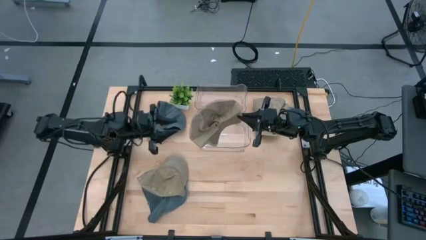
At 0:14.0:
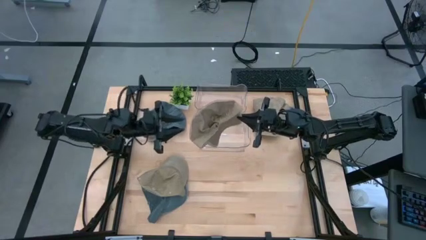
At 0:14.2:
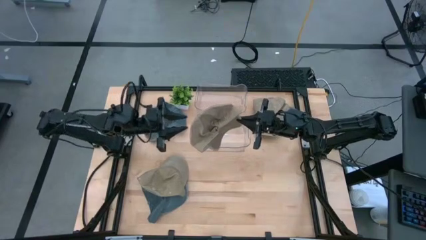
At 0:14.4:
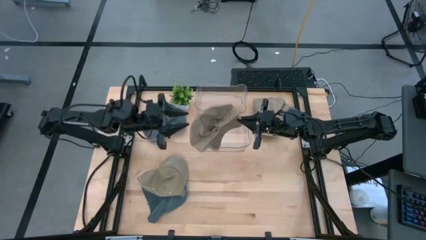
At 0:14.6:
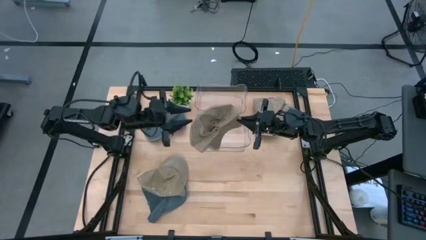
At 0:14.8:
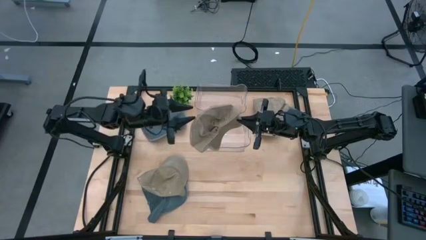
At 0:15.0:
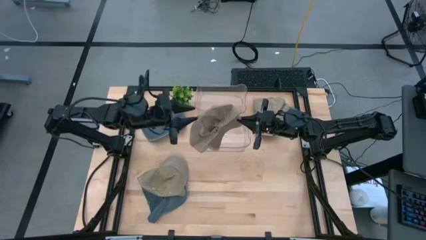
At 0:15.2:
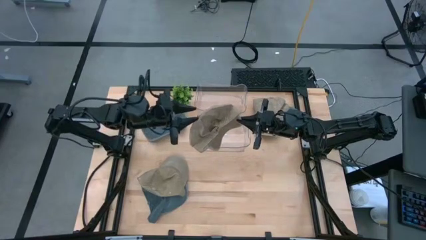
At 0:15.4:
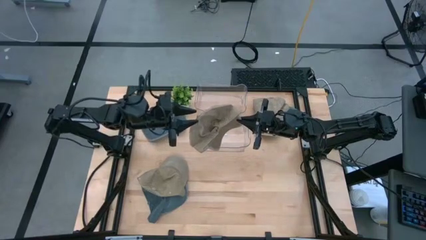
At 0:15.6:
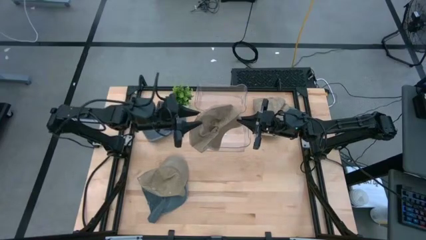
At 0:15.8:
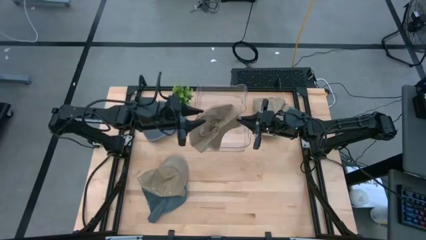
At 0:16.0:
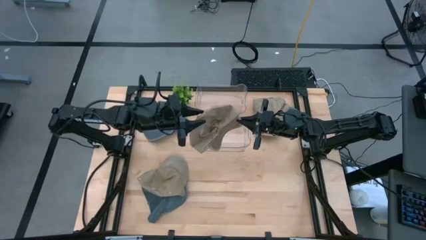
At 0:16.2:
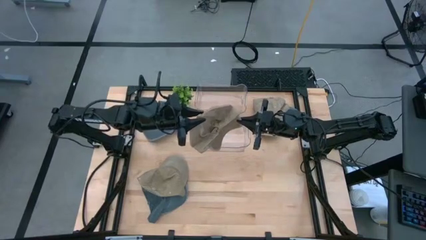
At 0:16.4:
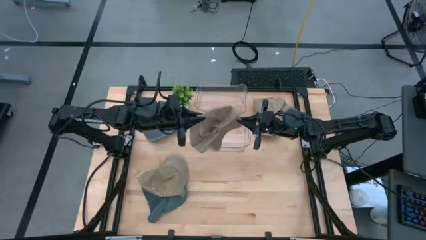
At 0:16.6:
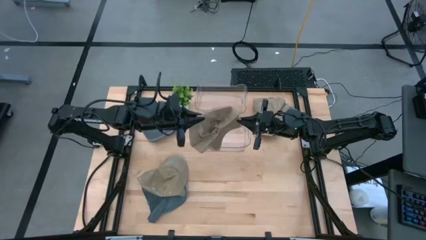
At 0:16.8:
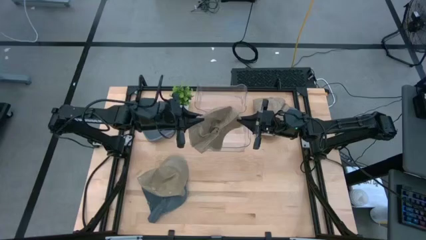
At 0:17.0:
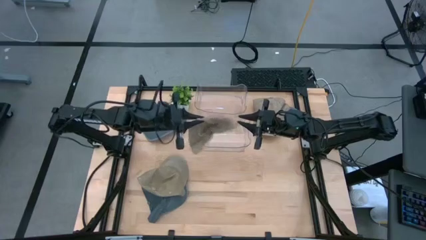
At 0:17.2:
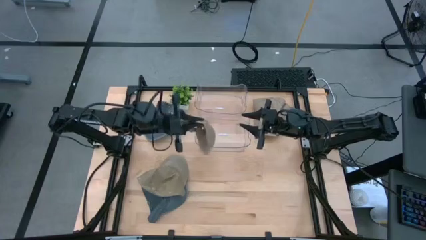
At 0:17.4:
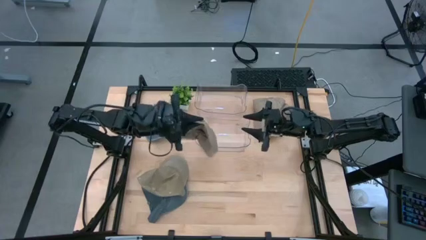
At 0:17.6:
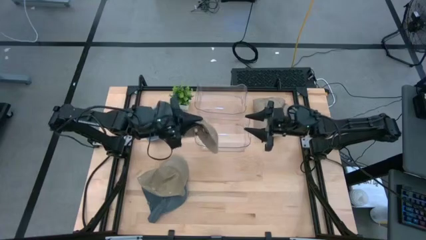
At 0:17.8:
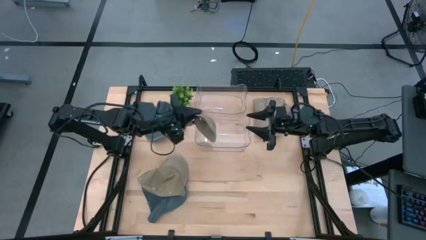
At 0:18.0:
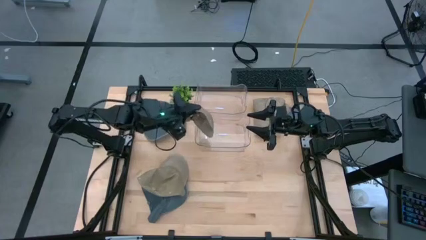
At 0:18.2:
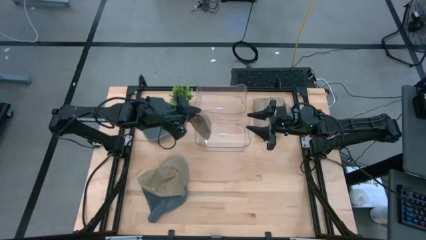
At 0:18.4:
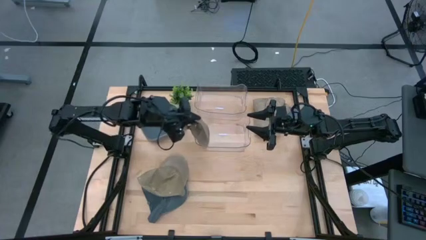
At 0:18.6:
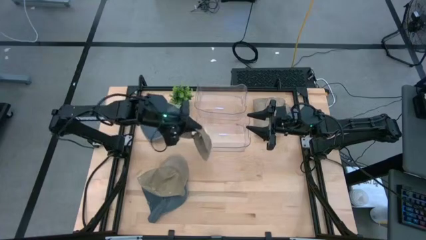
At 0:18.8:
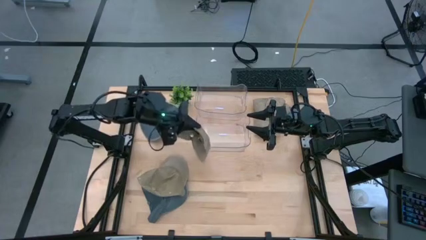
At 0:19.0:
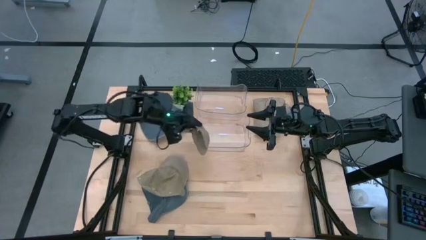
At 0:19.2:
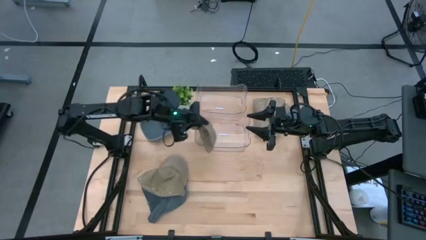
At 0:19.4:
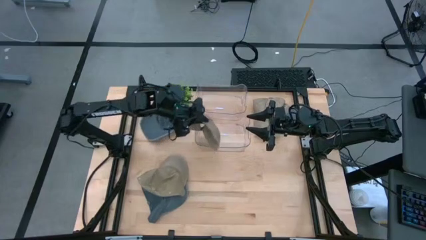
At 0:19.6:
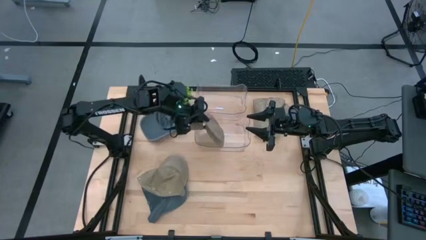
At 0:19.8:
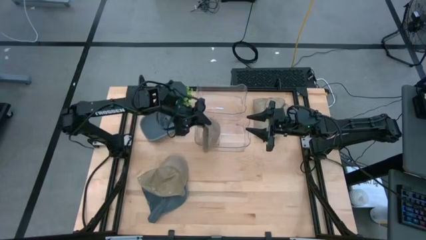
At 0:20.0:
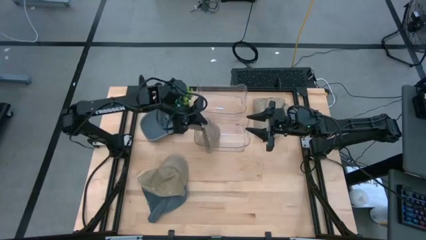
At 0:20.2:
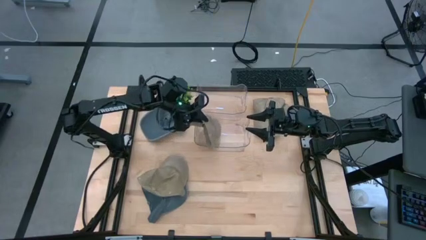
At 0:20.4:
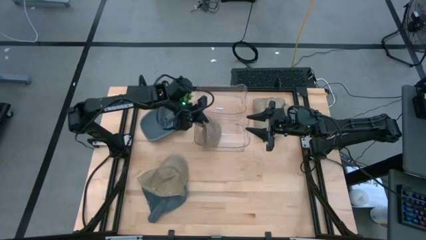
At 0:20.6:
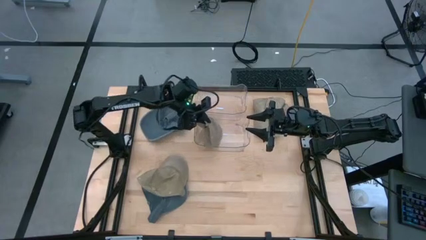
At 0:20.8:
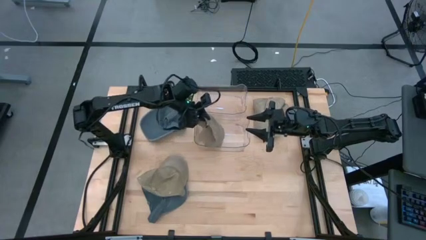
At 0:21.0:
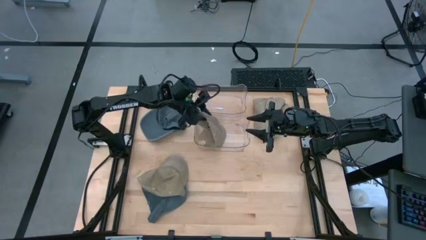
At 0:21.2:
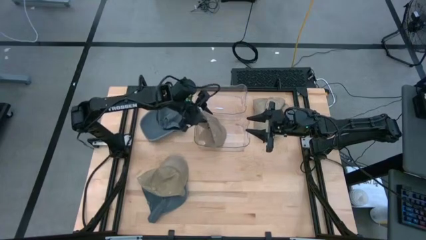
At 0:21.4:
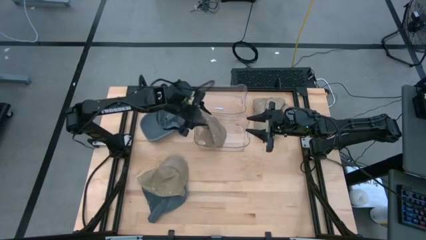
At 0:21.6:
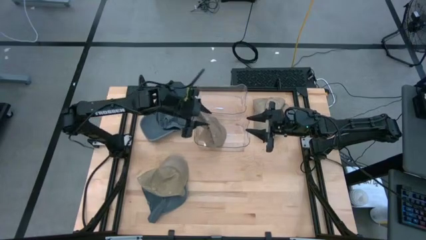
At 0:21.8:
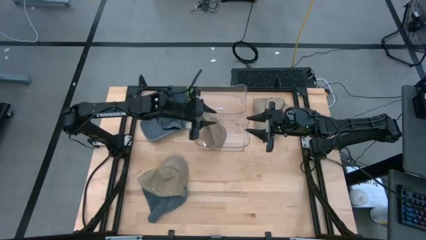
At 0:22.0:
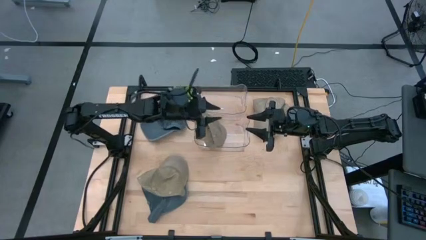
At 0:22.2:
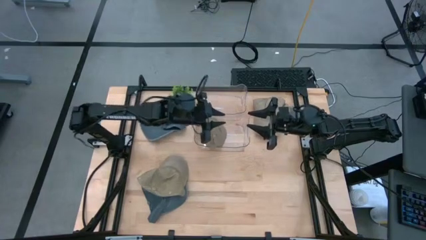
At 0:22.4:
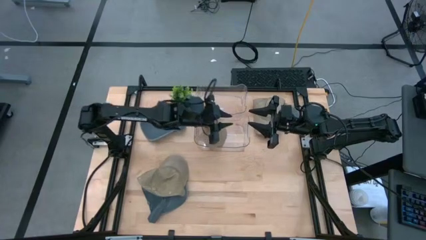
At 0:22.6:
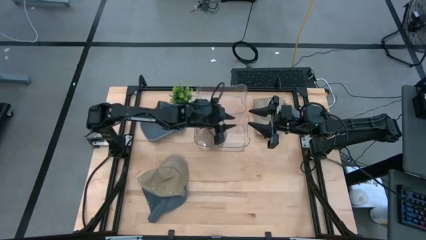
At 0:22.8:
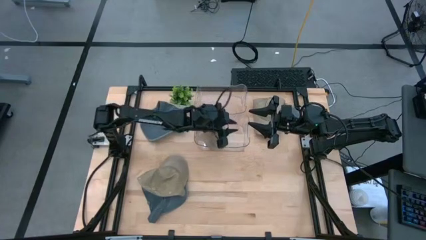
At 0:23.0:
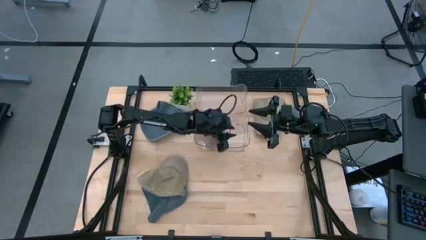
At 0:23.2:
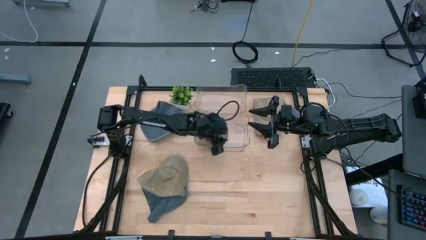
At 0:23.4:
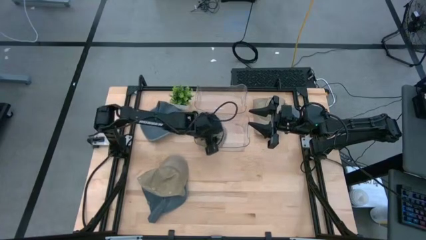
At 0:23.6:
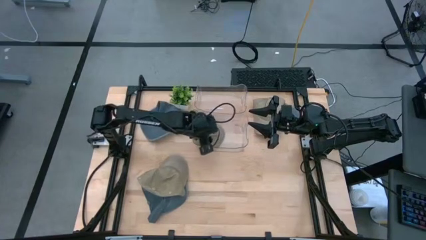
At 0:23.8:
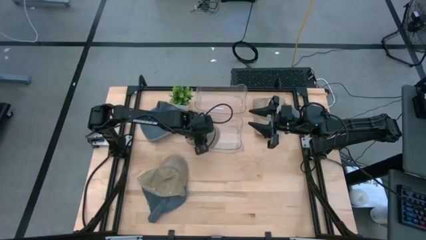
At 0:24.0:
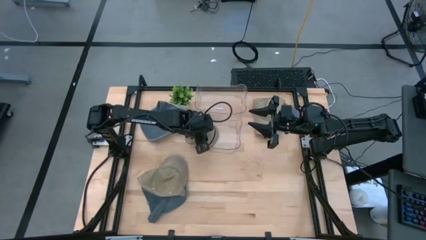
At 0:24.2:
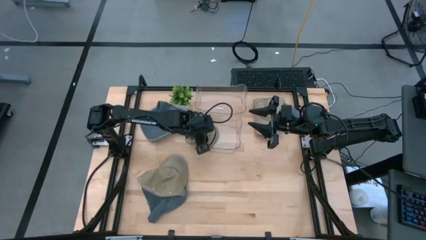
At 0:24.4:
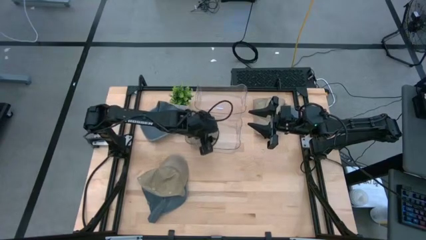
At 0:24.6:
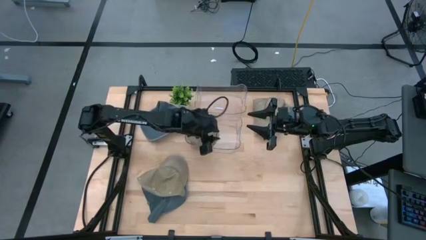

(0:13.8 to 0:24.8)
Task: Pick & Place hat
Put the bottom right brown cap into the bottom transparent bin

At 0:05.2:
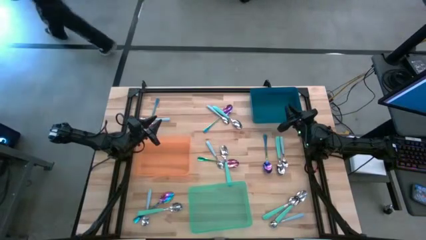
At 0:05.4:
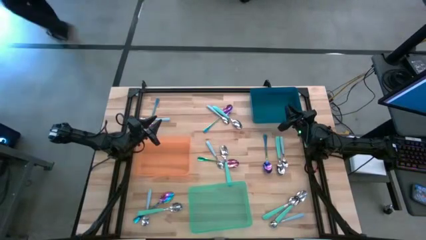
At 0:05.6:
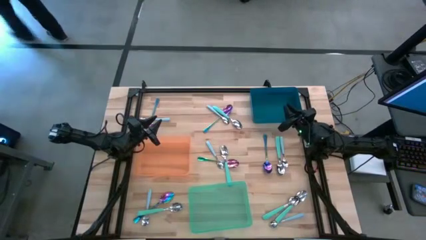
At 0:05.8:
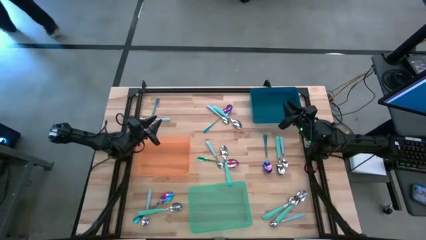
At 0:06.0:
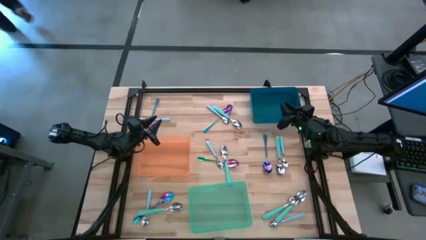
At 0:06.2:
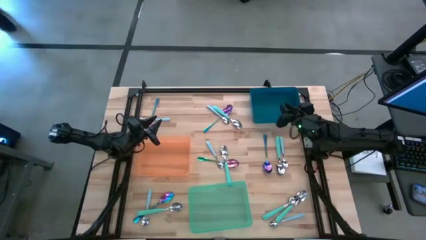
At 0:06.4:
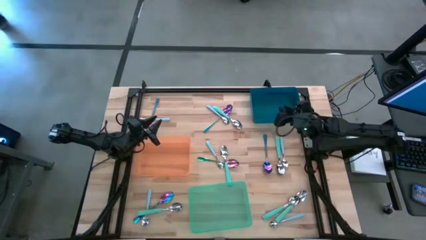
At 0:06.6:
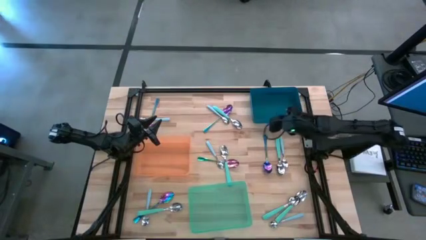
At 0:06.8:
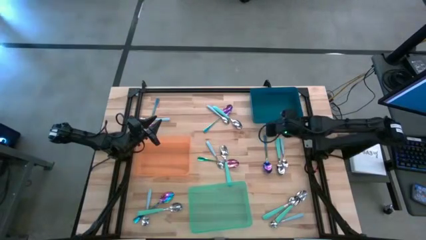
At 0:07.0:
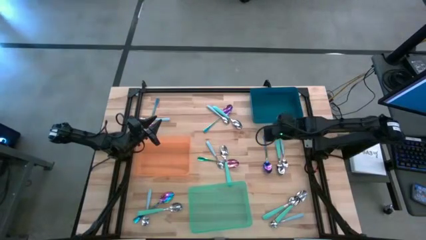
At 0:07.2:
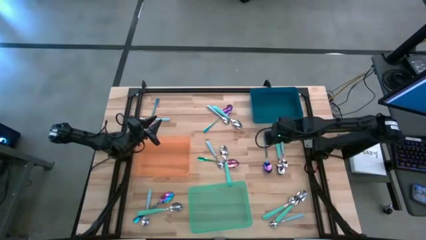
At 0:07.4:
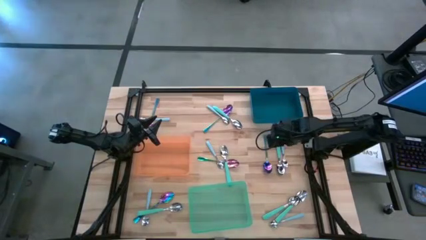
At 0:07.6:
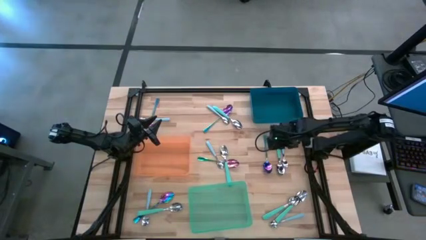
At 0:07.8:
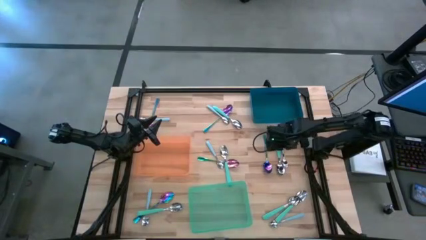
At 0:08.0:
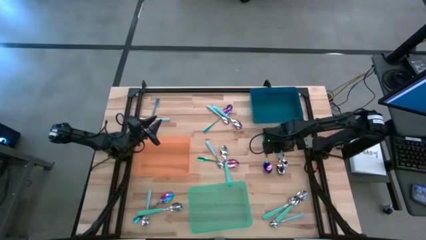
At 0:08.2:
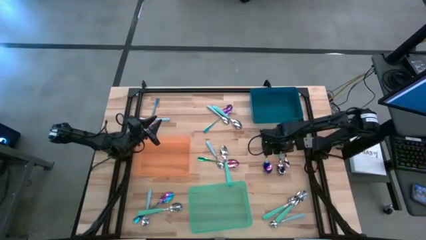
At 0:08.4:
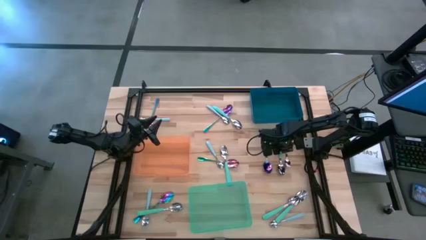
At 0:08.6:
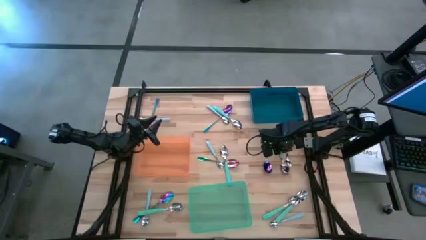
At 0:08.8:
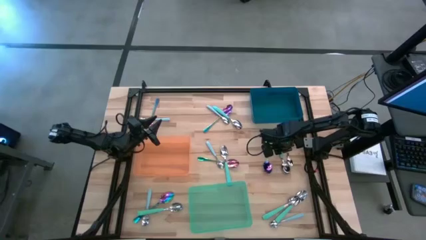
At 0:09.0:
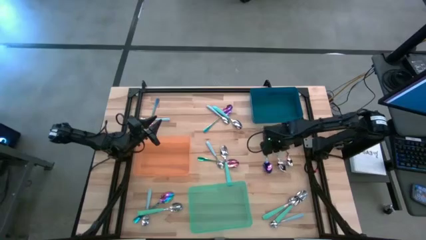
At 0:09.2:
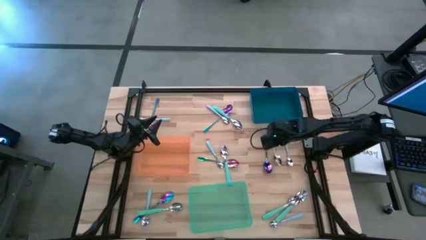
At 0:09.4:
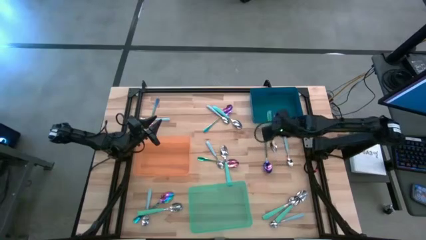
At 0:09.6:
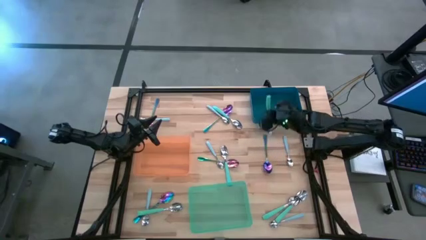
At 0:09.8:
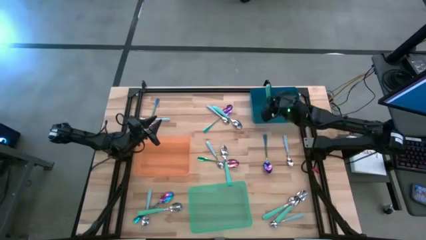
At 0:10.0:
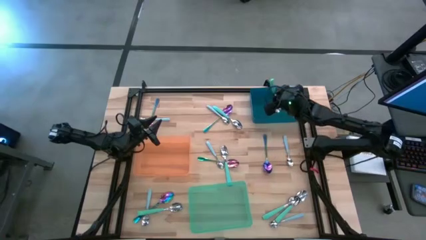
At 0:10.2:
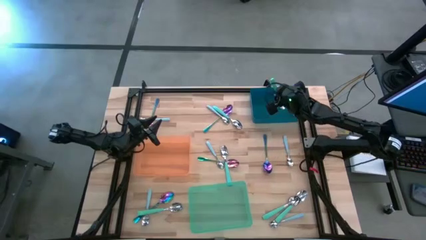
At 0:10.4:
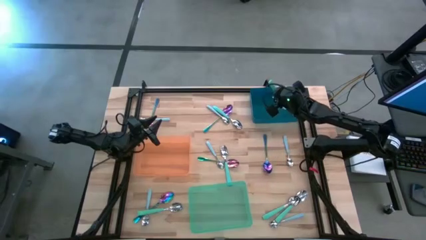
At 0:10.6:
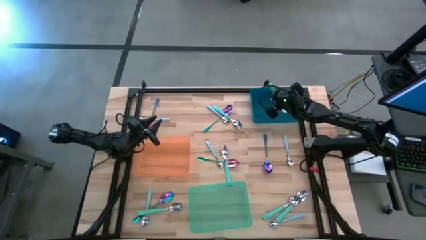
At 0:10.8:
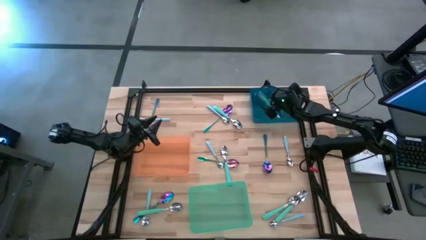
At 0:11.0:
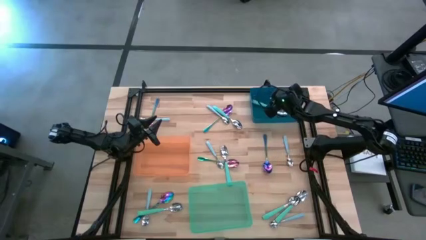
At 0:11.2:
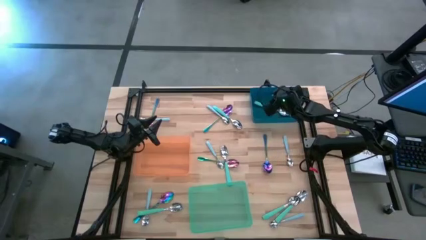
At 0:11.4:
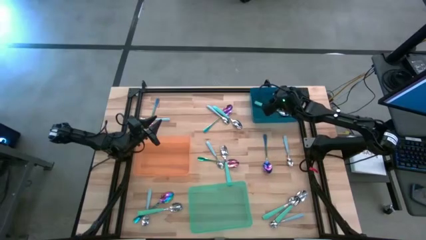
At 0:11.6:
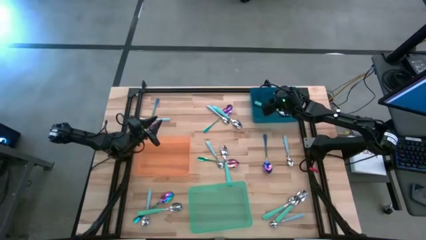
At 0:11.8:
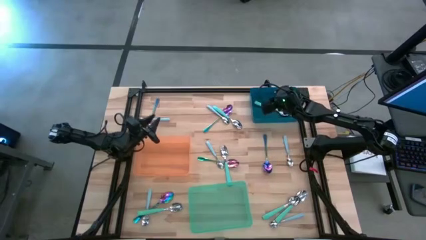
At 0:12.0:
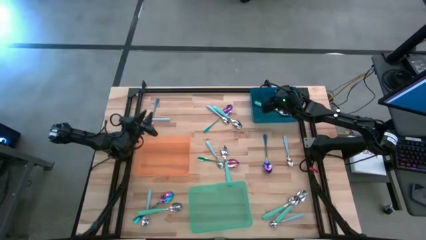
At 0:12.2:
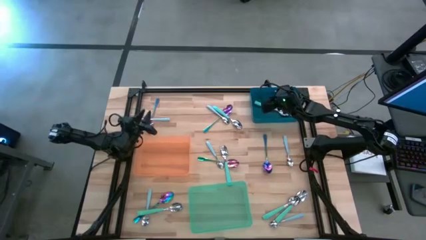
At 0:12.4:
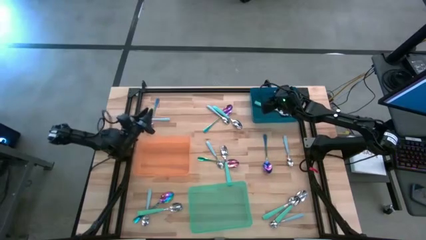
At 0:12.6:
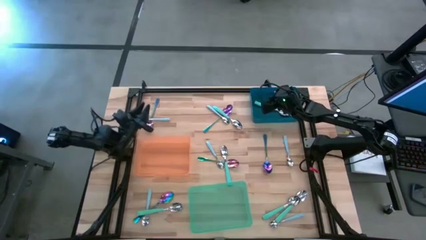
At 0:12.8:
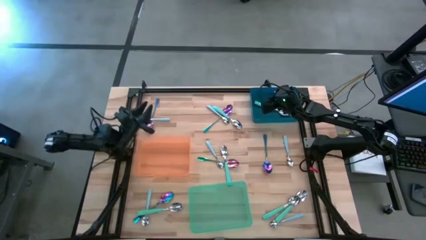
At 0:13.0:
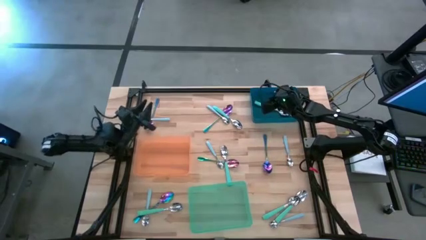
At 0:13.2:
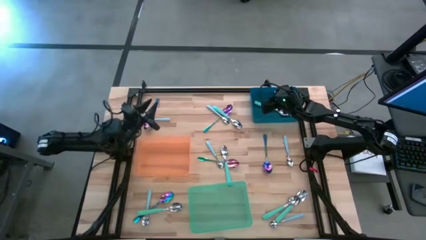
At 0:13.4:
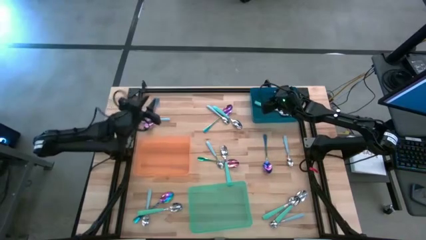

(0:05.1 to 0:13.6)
Task: Sort silverware by color (type)
Put the middle left blue spoon into the blue bin
